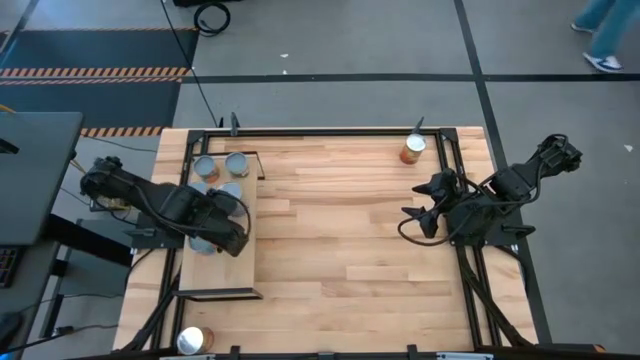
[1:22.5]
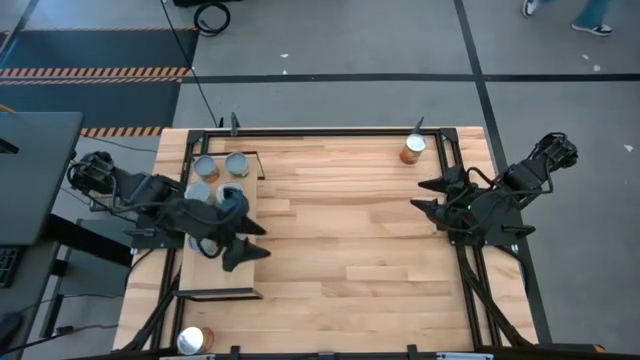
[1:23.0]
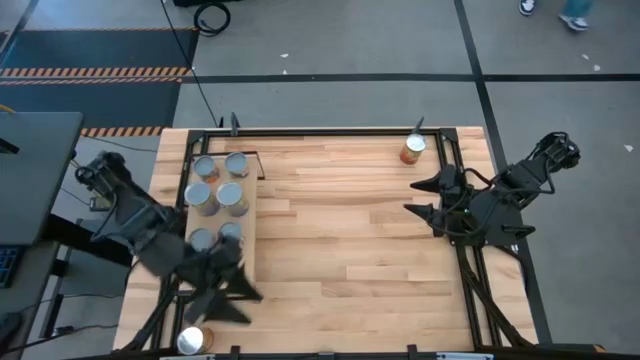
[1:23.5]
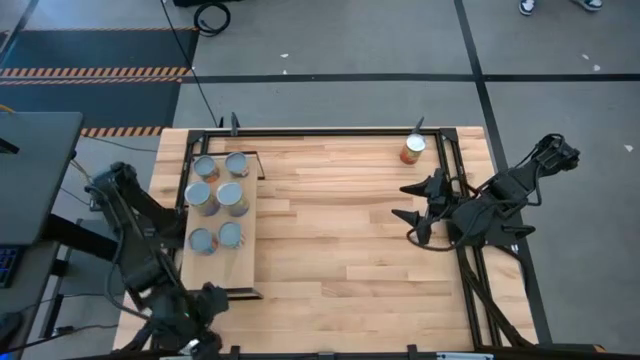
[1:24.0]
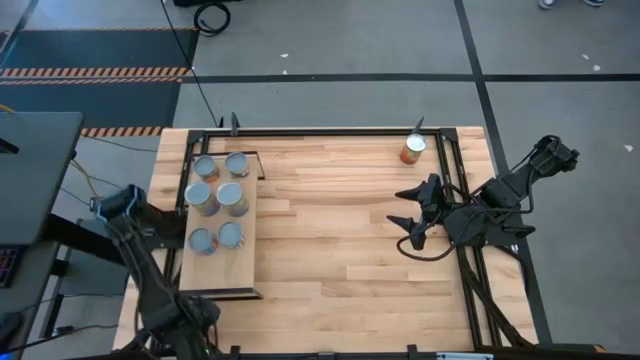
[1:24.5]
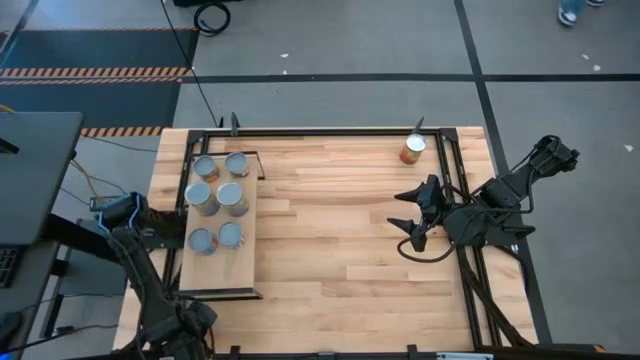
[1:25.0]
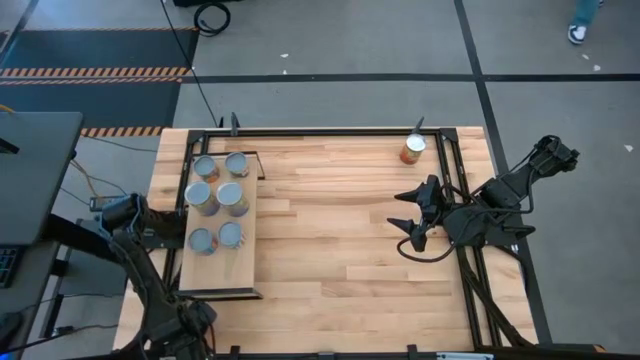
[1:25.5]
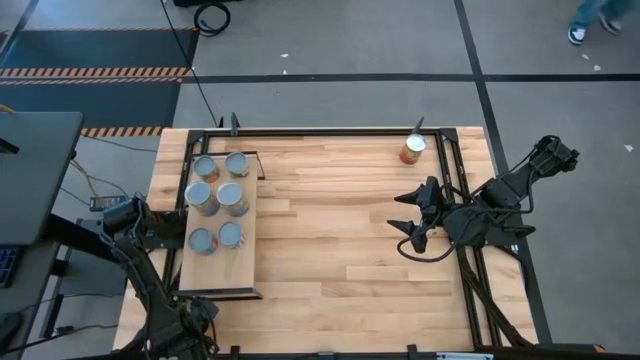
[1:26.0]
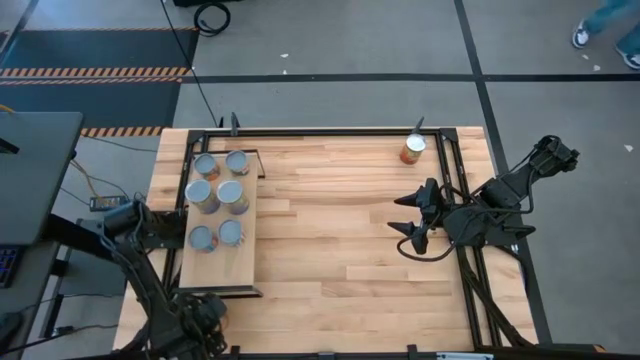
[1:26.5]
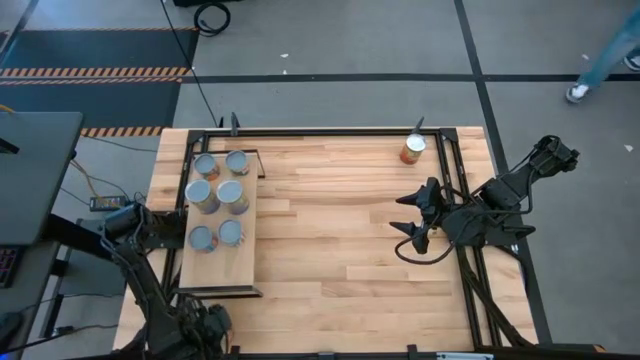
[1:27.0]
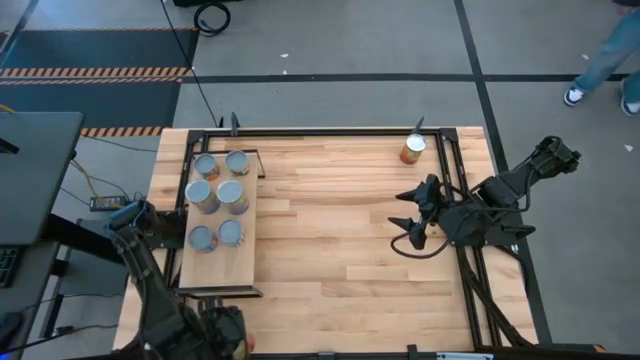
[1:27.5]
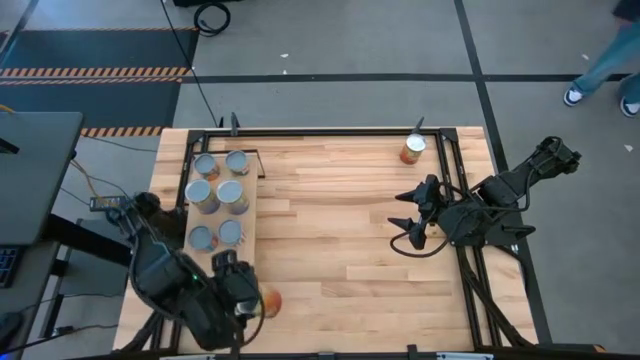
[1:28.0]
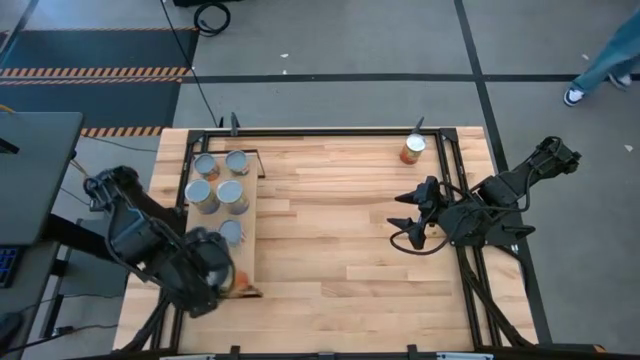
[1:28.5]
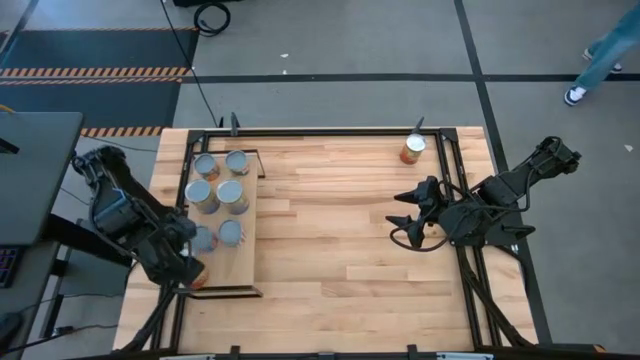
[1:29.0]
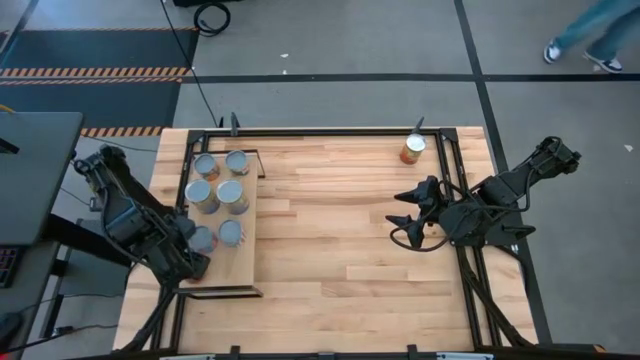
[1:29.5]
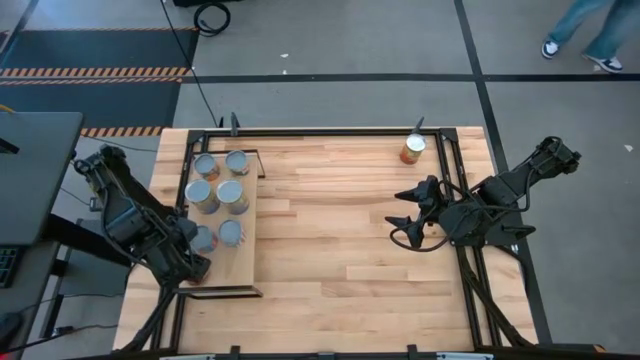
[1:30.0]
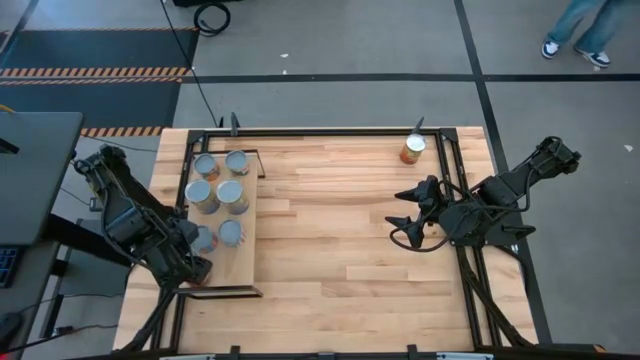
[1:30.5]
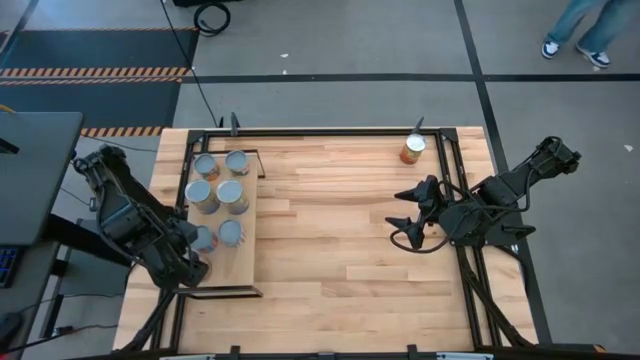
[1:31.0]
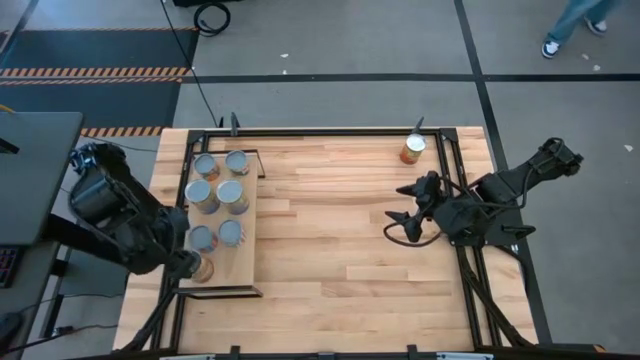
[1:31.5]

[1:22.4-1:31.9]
Task: Pick and place cans onto a shelf
Put the bottom canned corn on the shelf

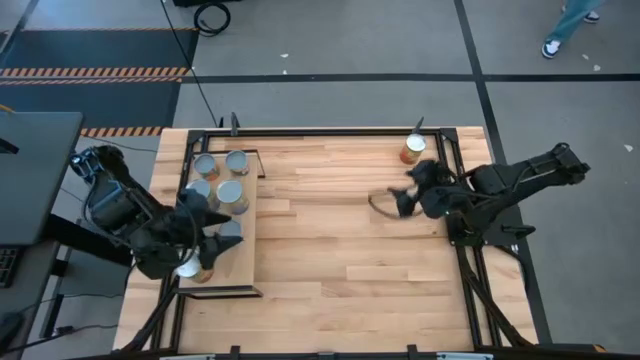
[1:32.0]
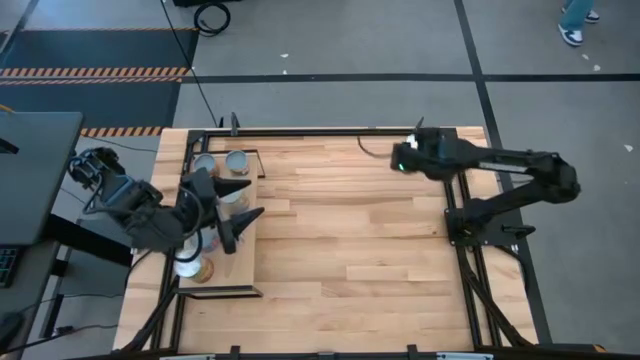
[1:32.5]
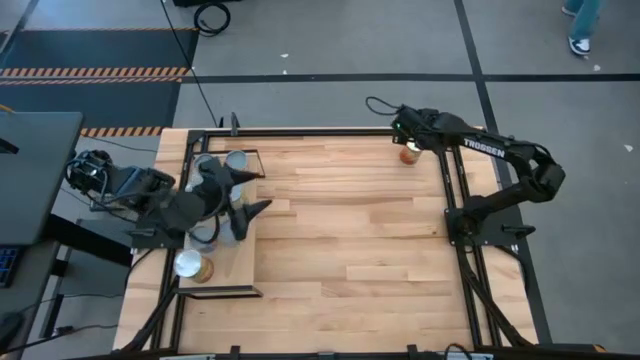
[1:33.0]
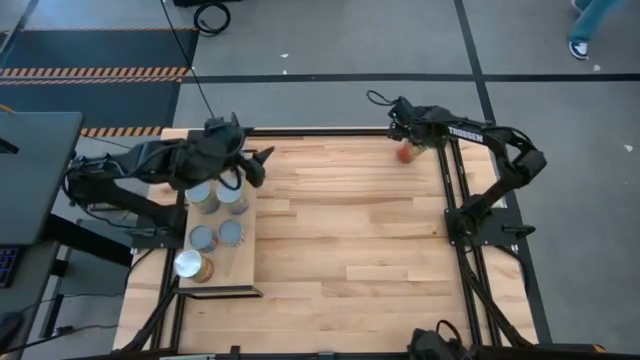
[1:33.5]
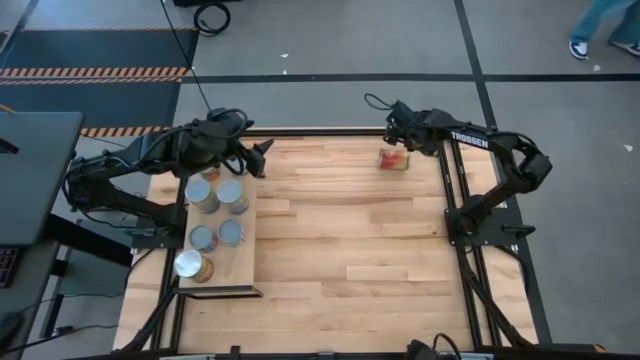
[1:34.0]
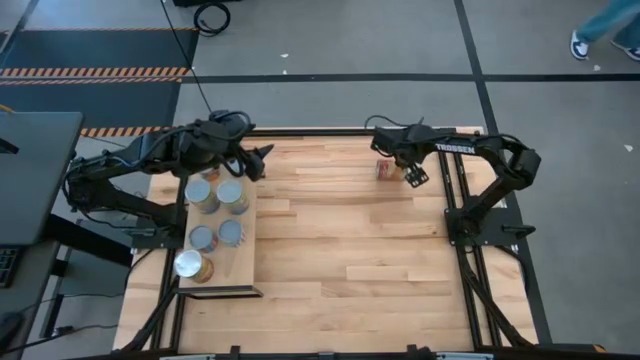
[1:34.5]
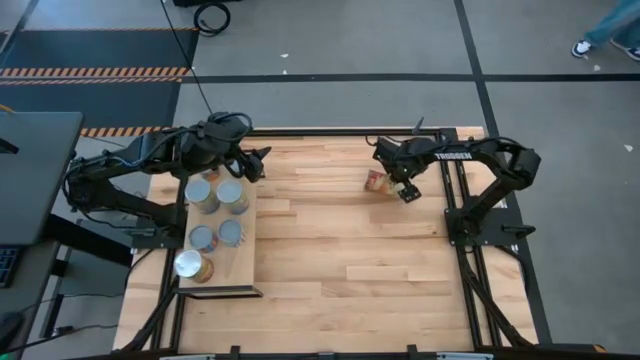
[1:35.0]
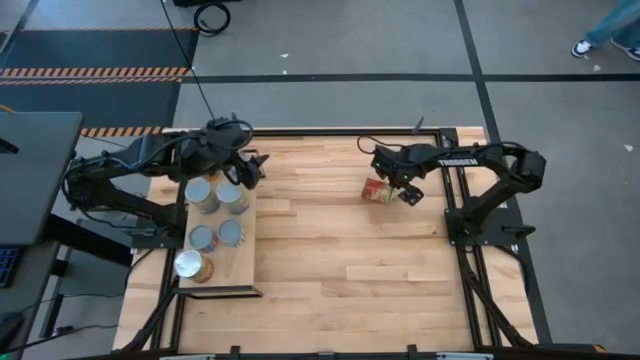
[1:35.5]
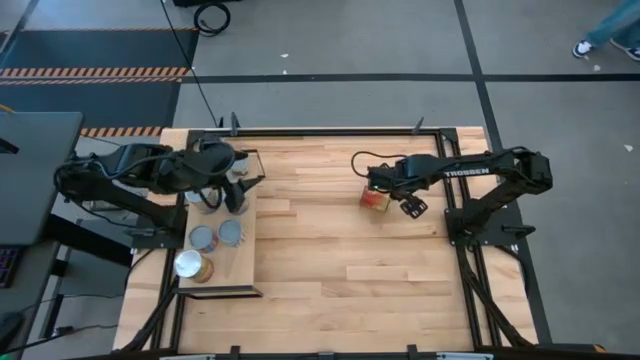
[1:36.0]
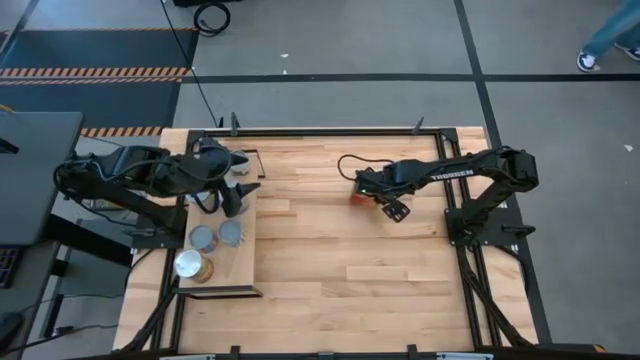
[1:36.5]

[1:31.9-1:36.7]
Put the canned corn on the shelf

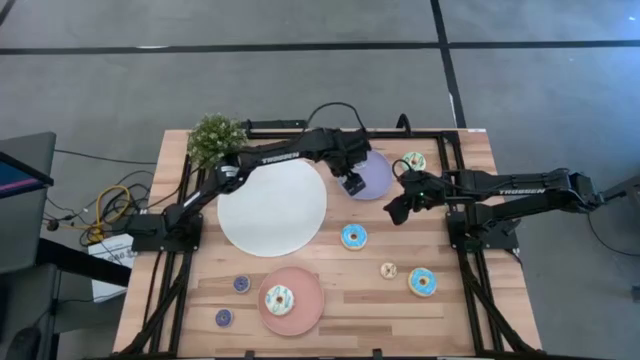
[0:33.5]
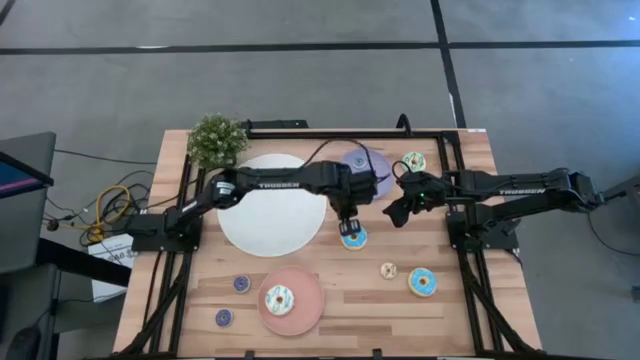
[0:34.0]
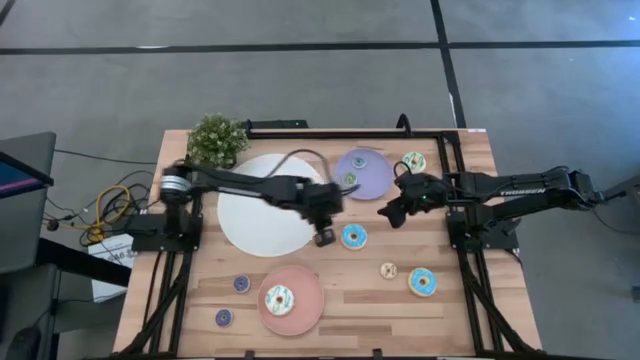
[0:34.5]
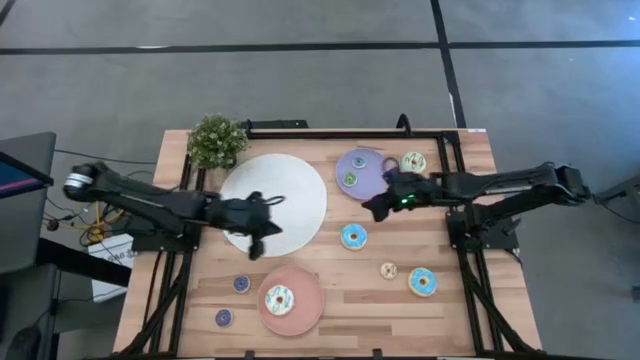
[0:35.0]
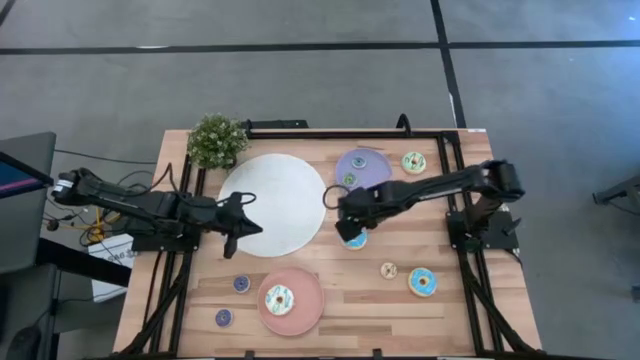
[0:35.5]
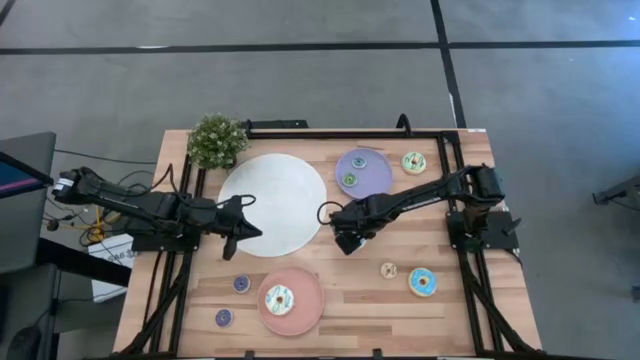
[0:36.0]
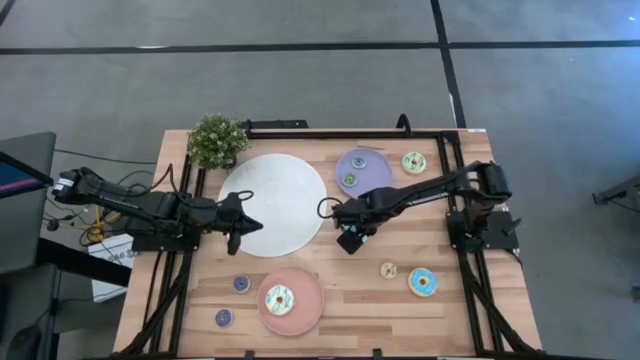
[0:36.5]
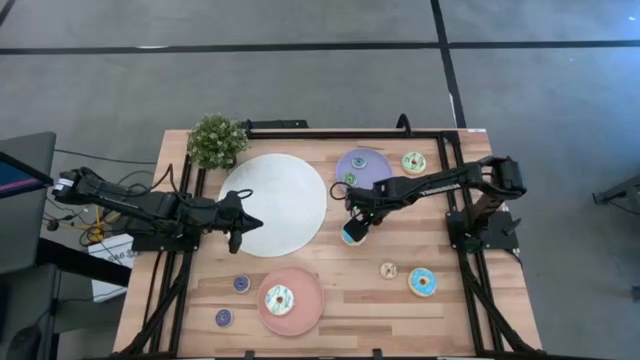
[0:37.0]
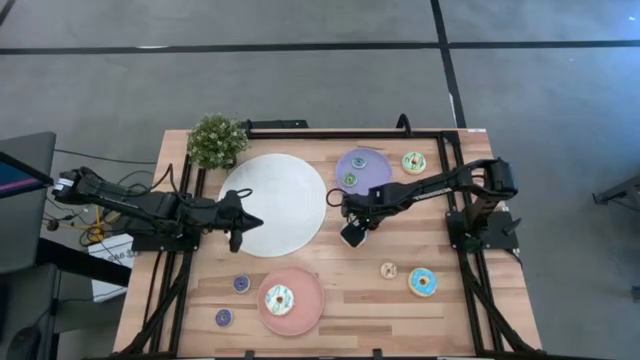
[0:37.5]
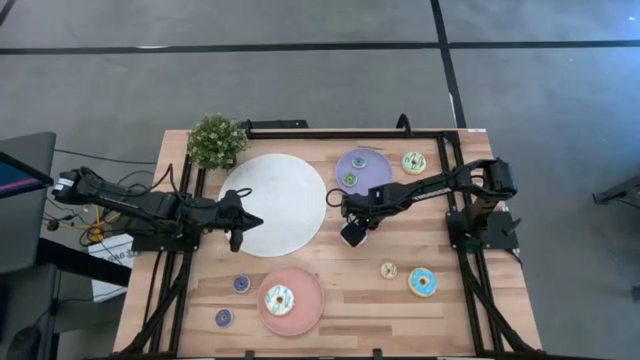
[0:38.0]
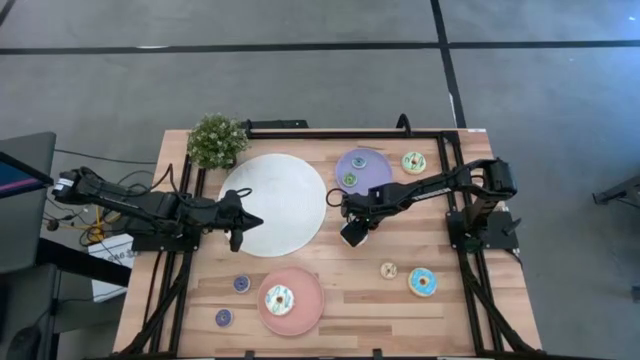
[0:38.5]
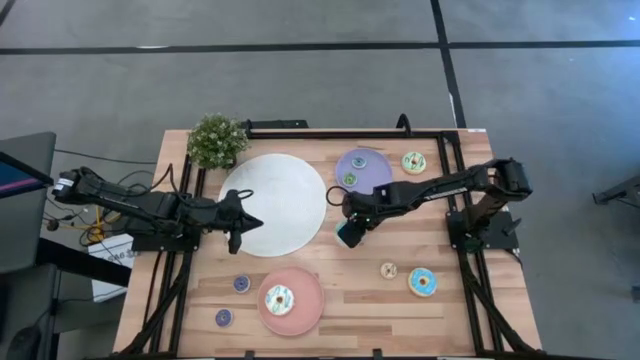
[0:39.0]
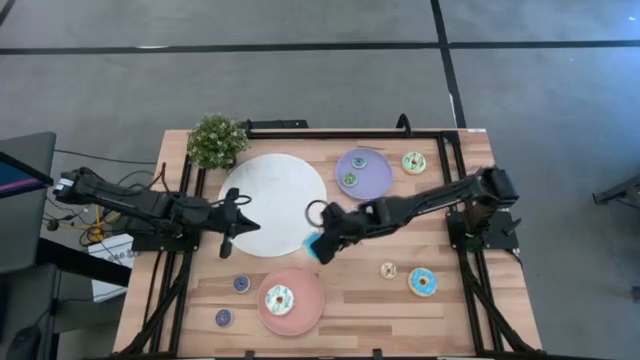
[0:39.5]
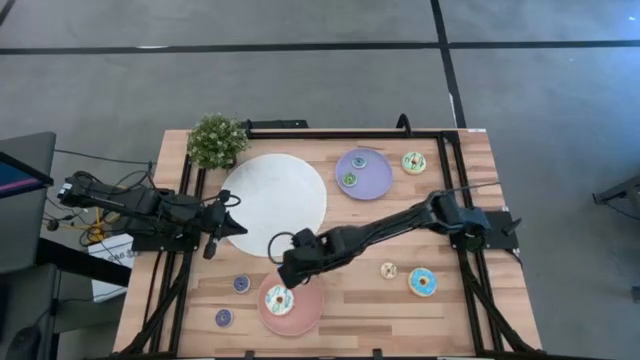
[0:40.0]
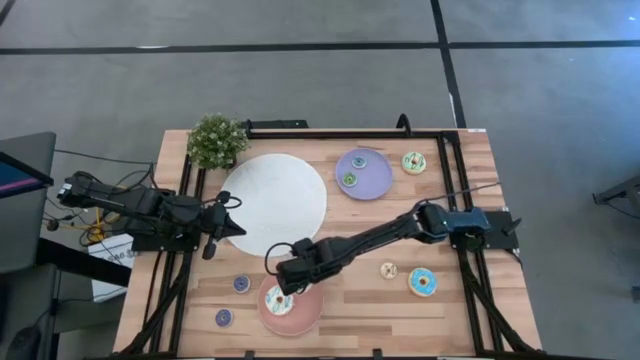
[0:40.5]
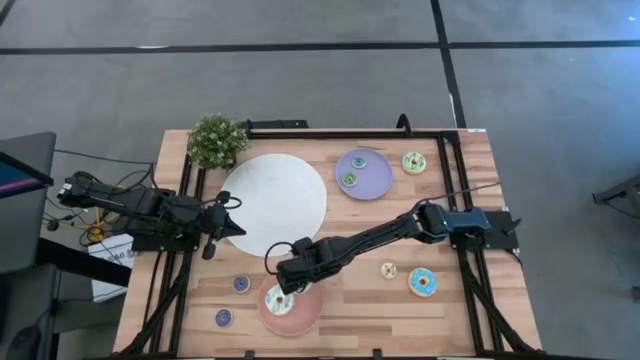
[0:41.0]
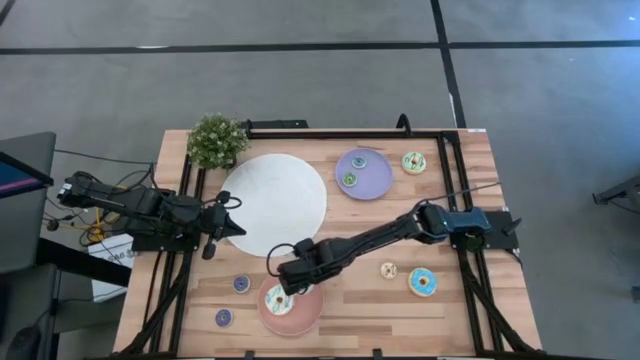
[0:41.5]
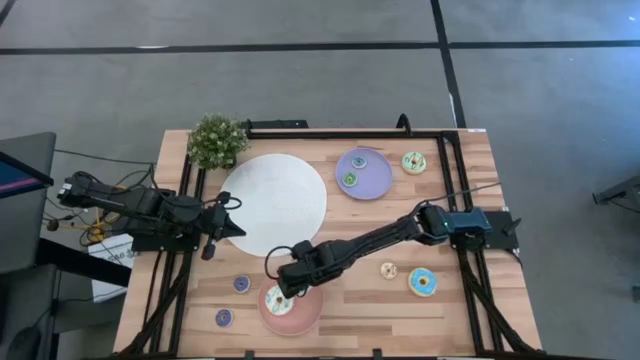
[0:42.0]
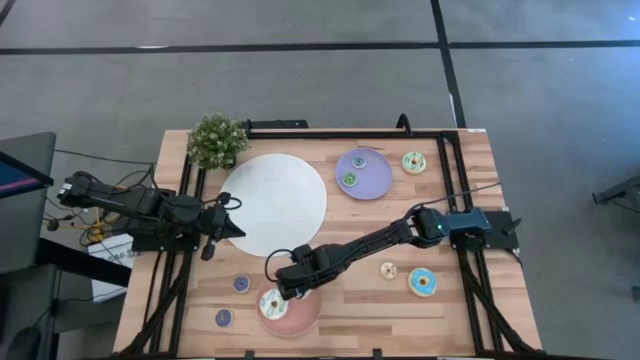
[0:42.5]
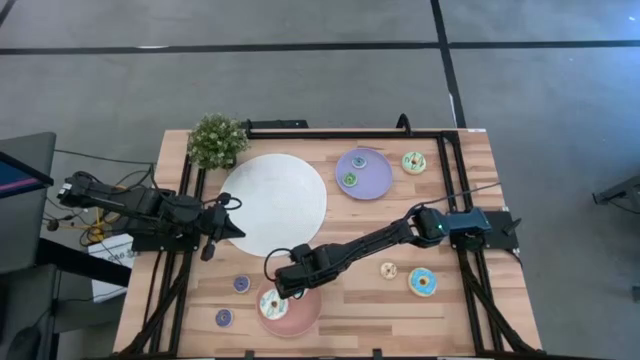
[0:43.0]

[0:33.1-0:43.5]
Task: Pick & Place donuts
Put the large blue donut on the pink plate
